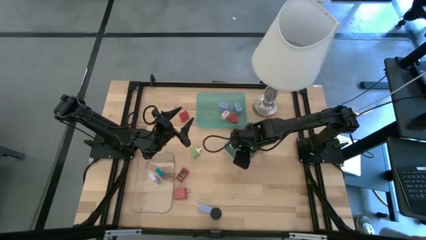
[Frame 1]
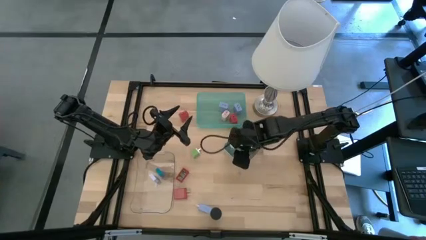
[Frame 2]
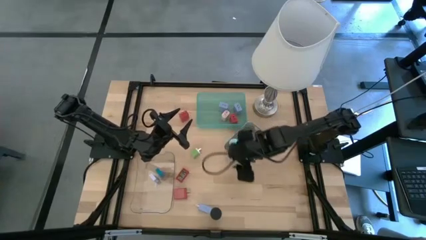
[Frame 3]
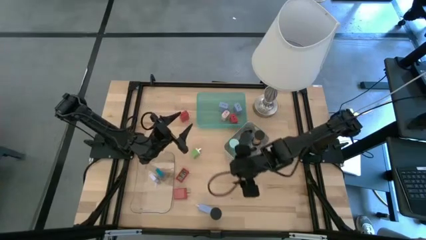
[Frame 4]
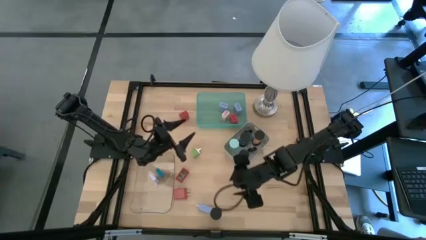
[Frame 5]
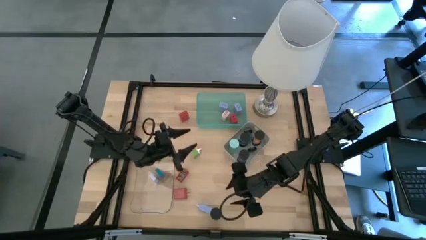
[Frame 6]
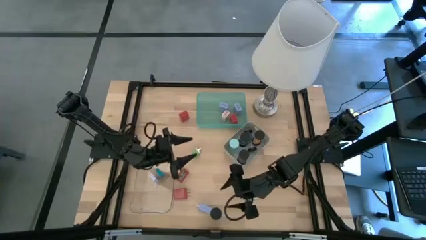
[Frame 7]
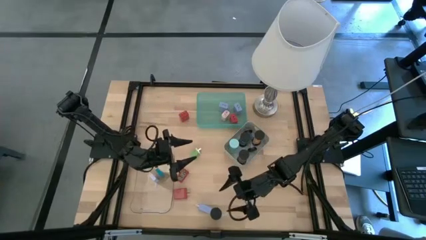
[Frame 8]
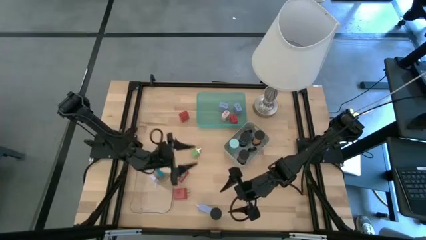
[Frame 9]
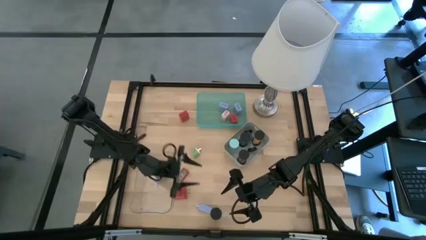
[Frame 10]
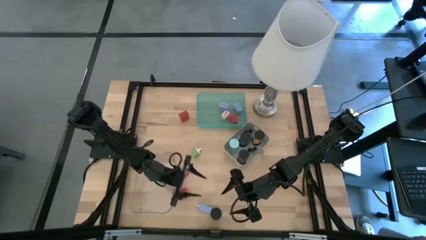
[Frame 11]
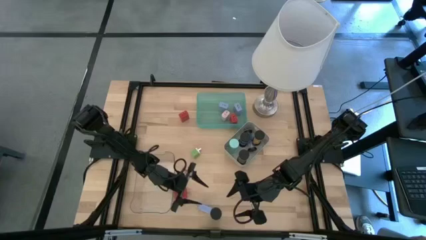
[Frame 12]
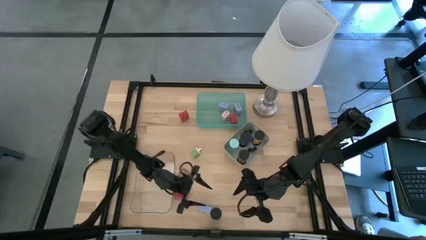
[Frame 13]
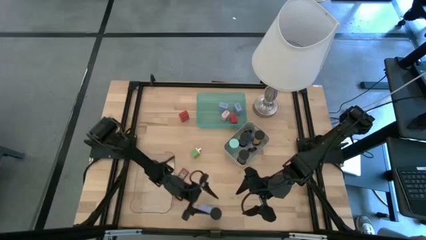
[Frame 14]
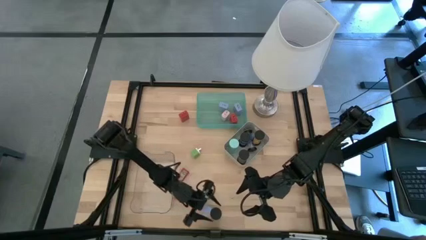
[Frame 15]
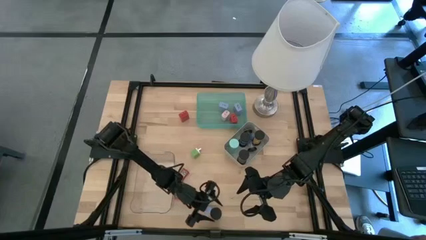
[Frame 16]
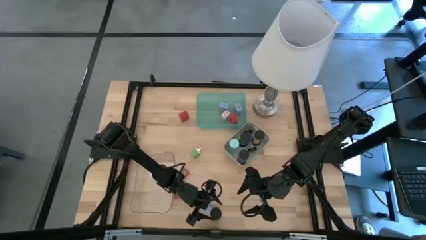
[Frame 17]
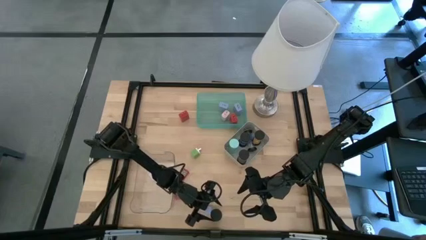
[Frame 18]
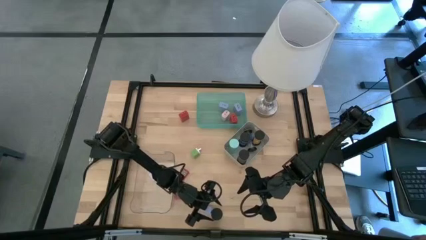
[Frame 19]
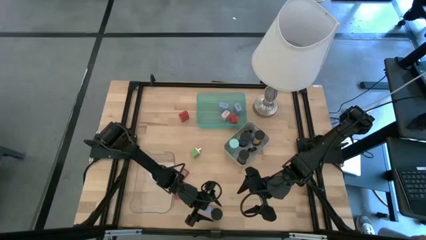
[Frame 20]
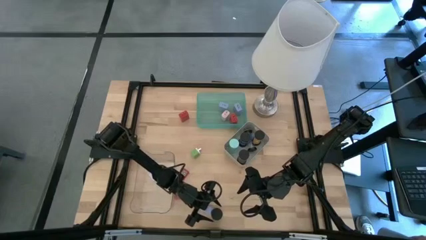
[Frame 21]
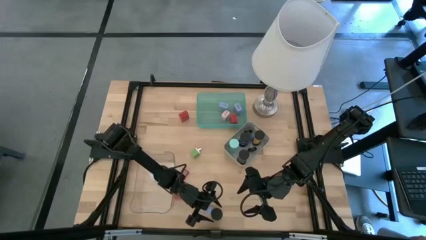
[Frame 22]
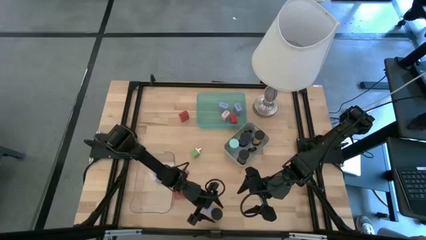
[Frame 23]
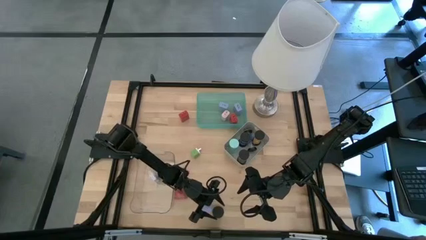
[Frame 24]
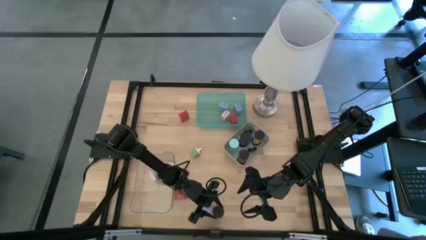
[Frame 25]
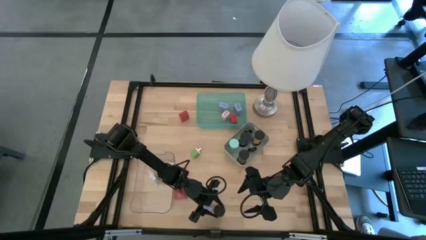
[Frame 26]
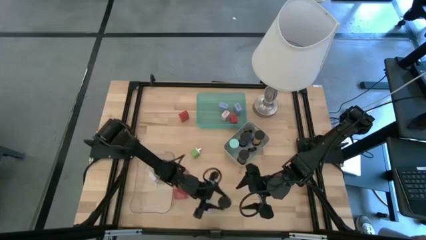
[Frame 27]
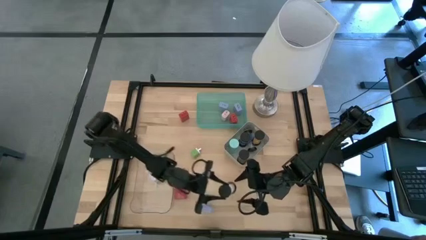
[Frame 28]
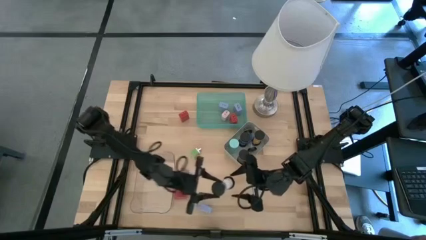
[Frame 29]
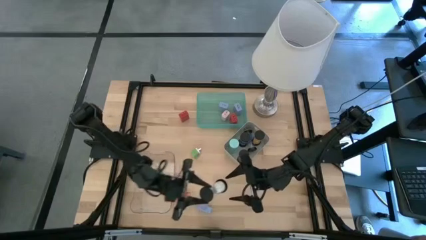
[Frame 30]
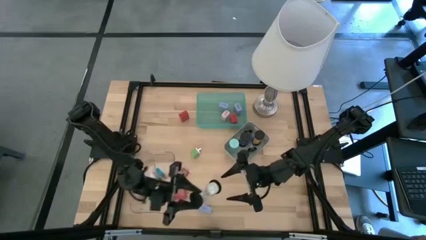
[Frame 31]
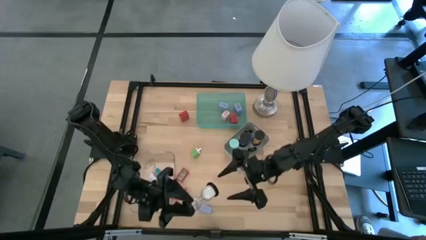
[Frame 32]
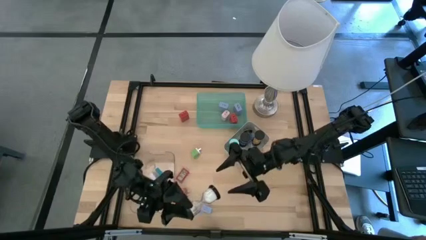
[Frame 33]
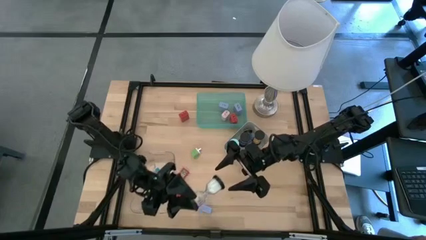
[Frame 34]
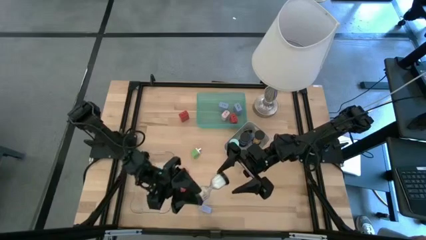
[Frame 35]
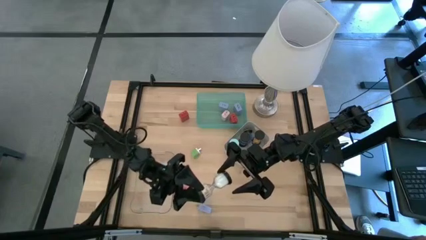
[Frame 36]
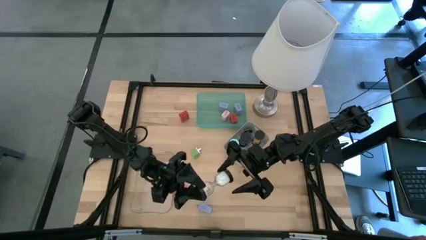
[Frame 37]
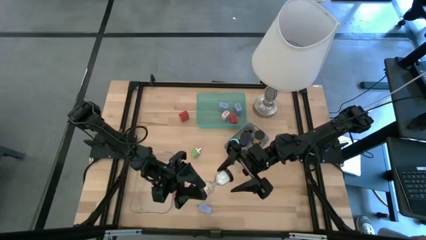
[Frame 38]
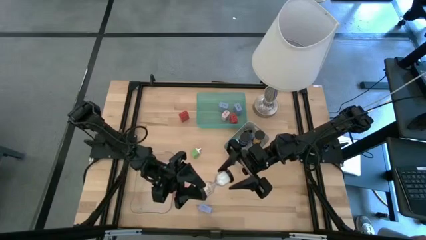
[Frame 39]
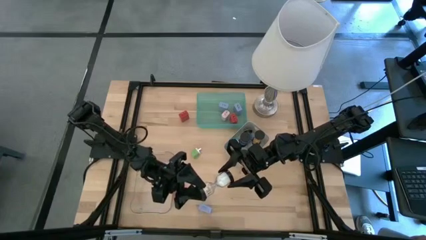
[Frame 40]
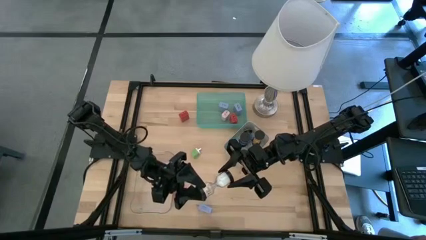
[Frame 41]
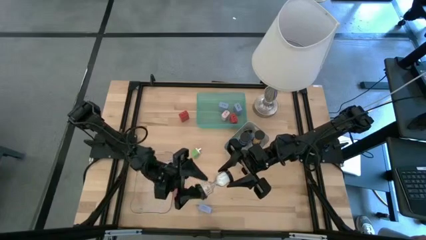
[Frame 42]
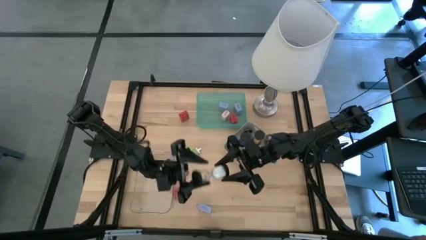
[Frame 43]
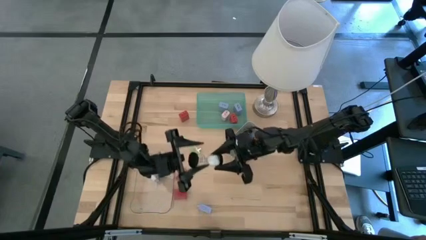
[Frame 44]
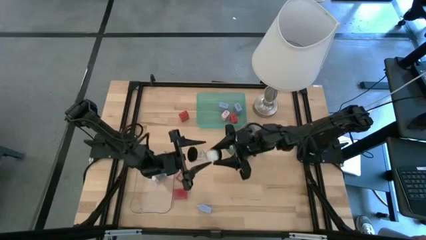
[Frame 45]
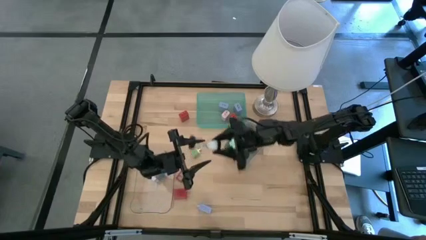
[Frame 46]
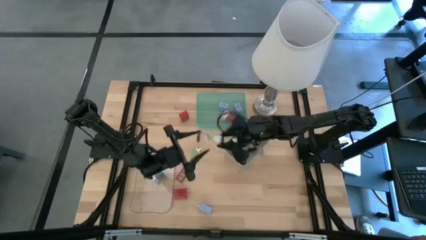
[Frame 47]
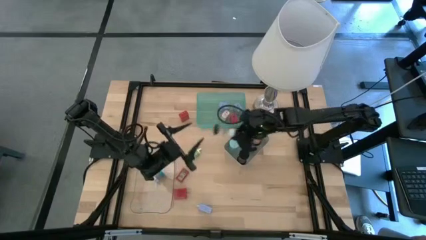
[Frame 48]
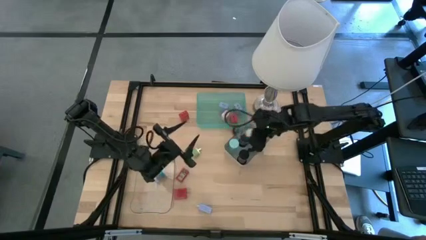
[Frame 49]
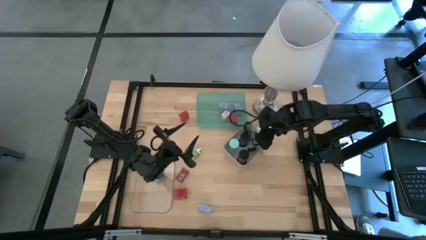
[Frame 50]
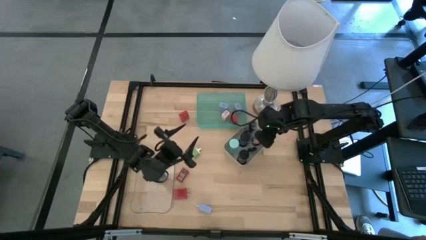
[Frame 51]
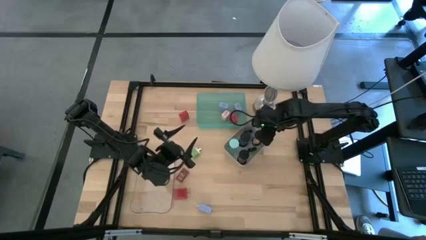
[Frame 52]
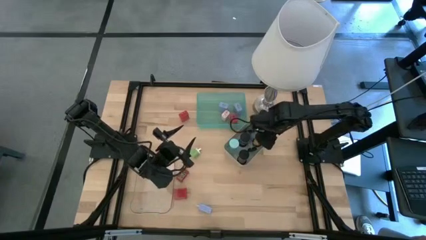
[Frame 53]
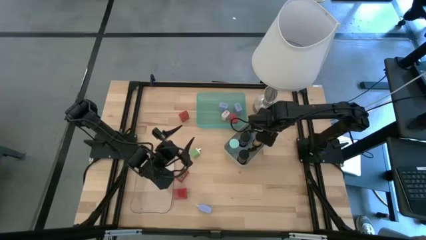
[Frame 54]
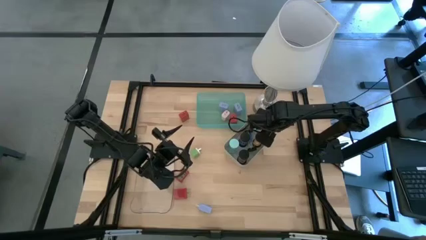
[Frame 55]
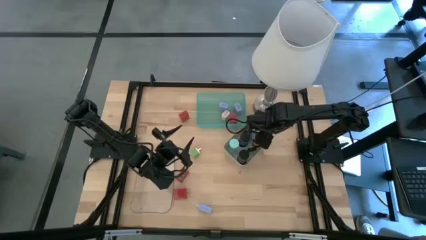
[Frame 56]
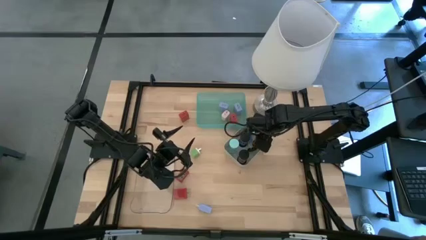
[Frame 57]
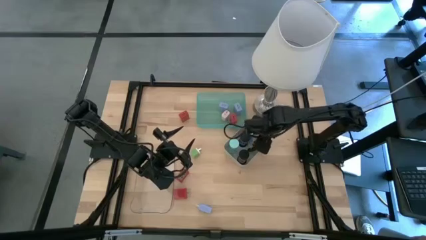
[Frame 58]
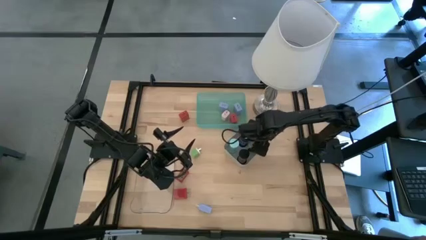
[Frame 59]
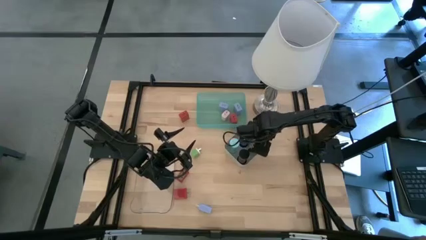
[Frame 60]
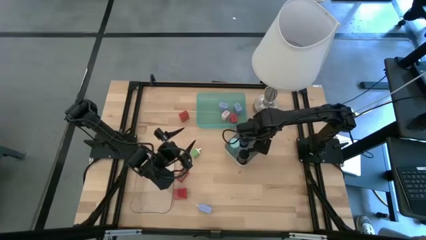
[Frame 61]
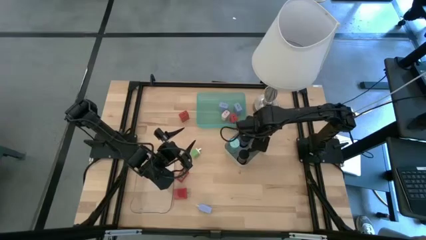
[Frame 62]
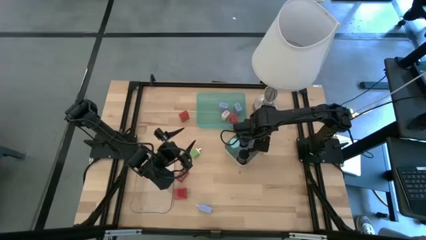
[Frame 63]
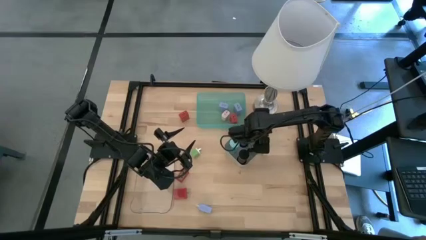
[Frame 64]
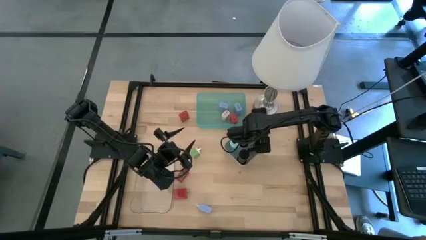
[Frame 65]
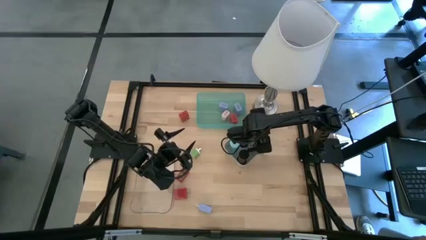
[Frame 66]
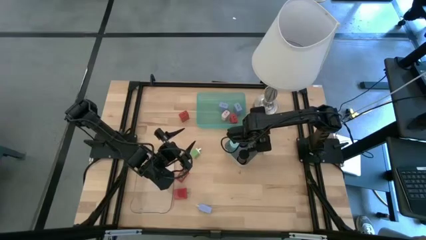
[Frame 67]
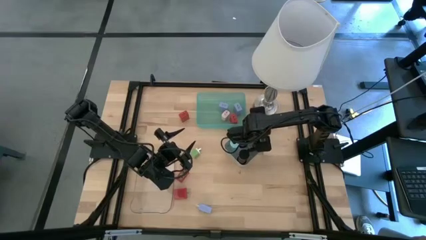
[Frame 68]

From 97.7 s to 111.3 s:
Task: Pick & Place Office items
Put the white hourglass into the gray bin

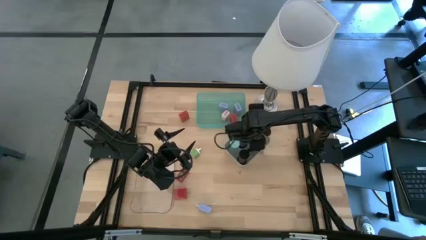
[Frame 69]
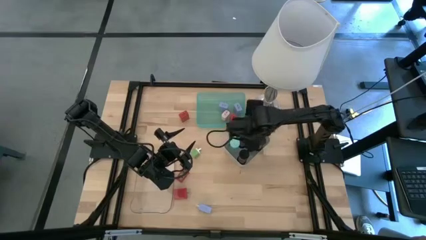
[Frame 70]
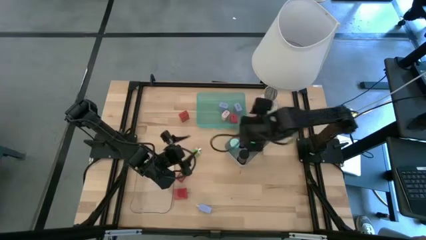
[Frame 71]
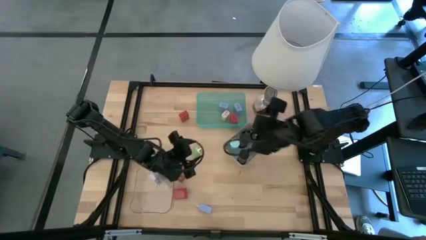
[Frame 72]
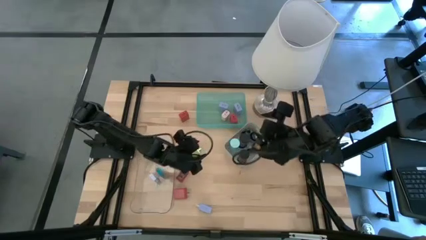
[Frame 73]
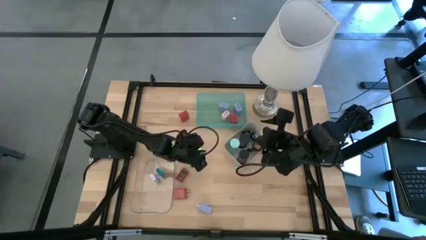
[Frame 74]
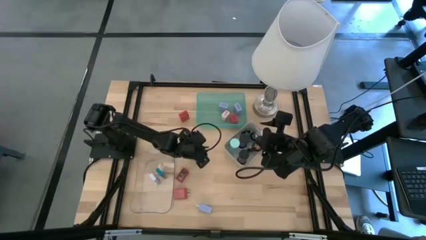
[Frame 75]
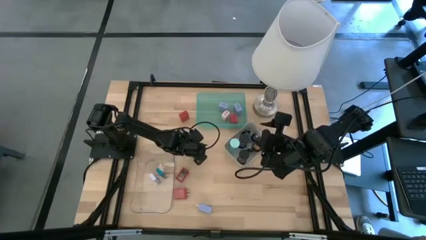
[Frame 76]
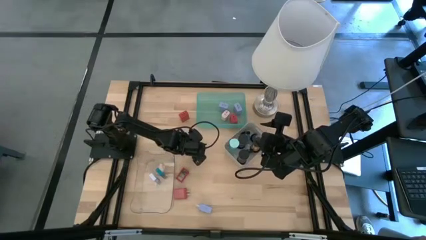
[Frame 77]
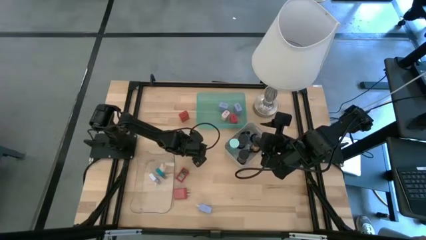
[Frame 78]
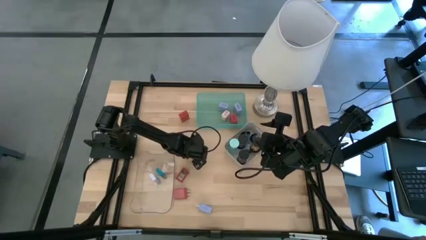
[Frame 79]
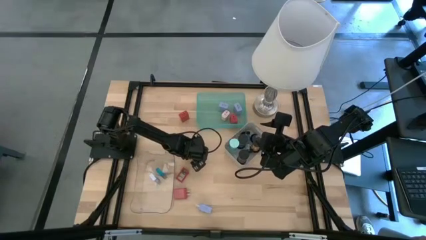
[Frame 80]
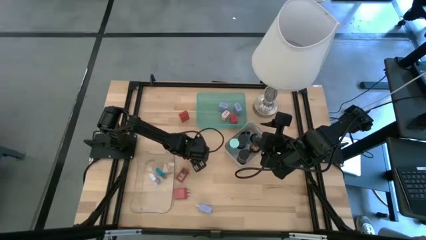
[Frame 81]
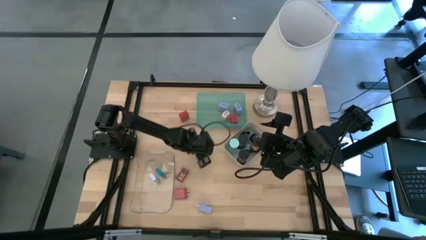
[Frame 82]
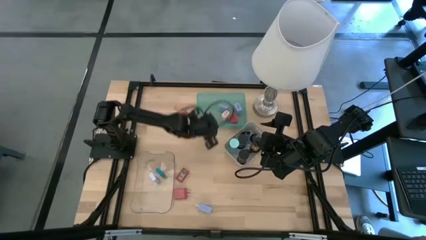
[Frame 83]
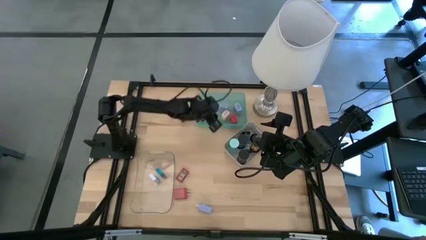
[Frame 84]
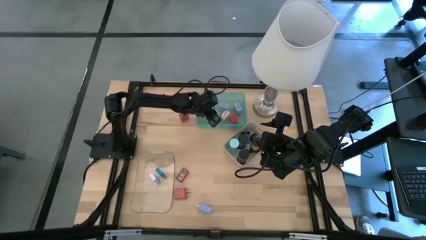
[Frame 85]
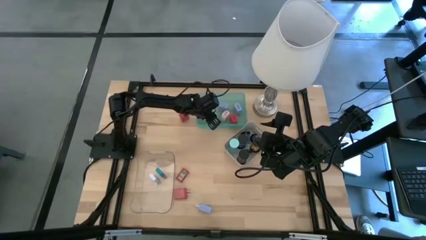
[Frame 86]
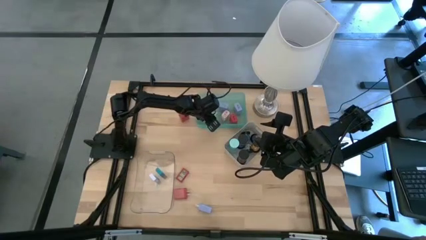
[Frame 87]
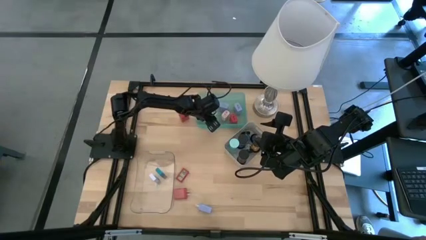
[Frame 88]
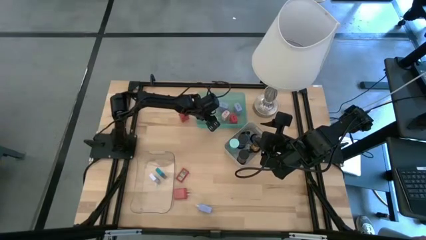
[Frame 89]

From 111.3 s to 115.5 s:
Put the green charger adapter into the green bin
